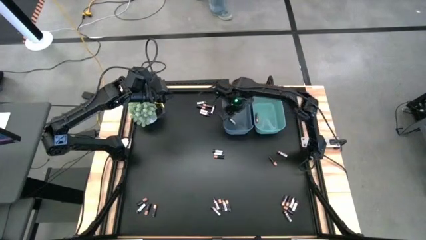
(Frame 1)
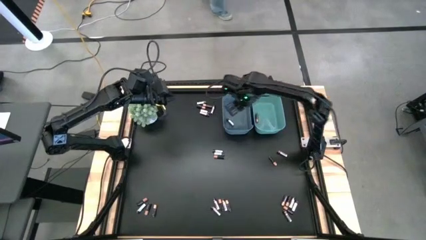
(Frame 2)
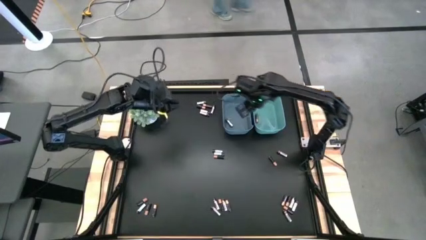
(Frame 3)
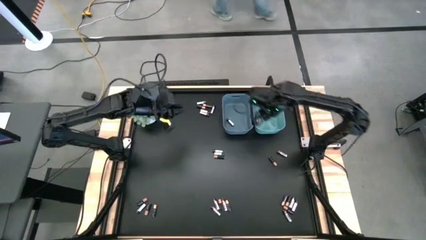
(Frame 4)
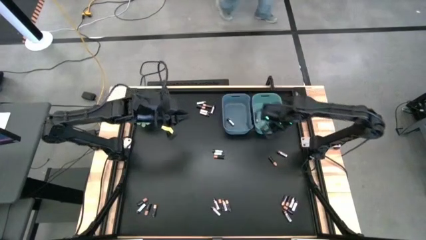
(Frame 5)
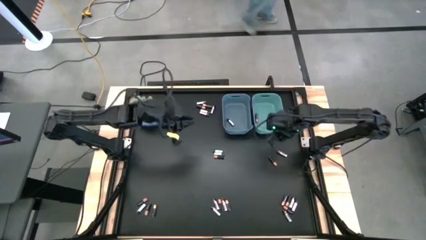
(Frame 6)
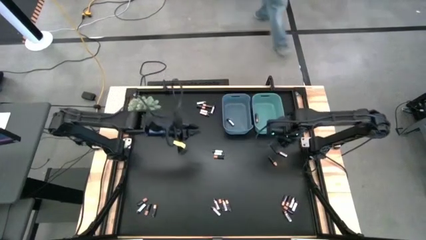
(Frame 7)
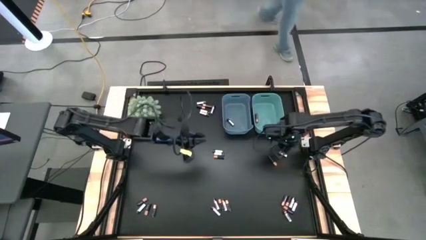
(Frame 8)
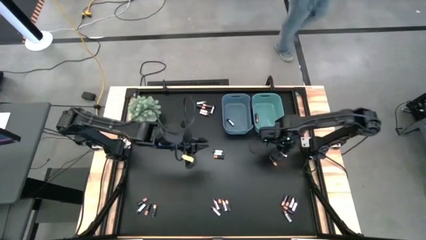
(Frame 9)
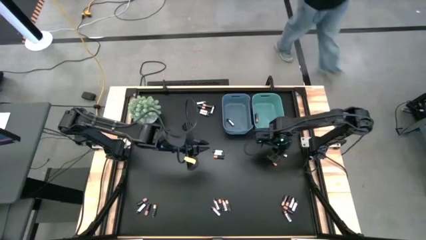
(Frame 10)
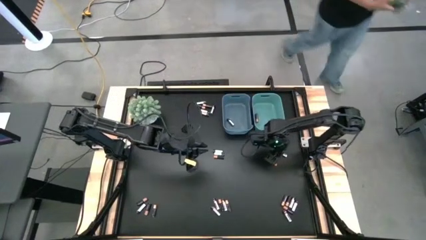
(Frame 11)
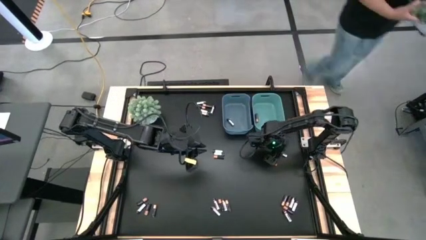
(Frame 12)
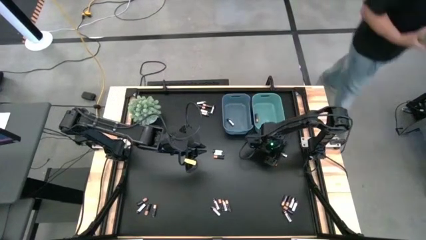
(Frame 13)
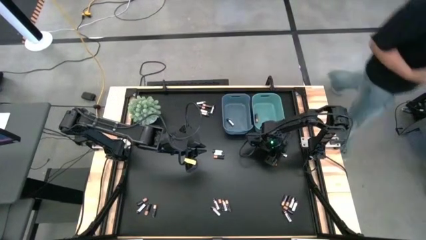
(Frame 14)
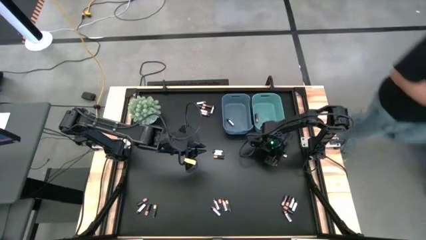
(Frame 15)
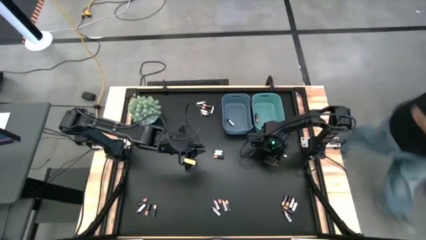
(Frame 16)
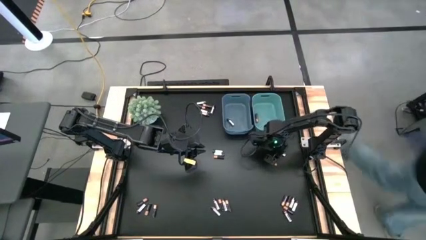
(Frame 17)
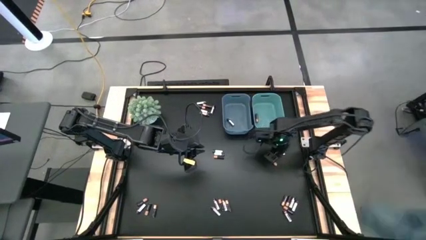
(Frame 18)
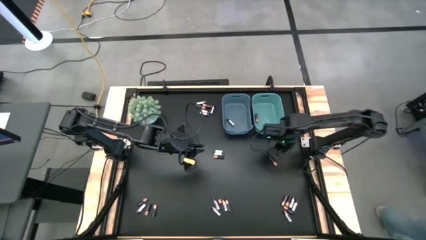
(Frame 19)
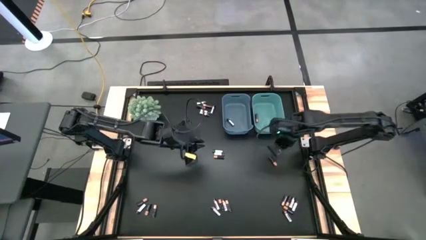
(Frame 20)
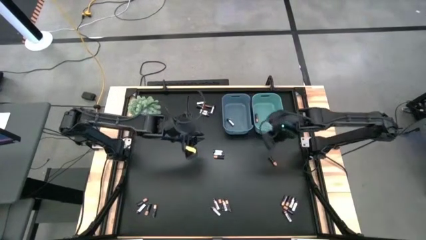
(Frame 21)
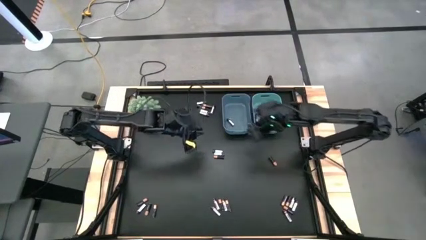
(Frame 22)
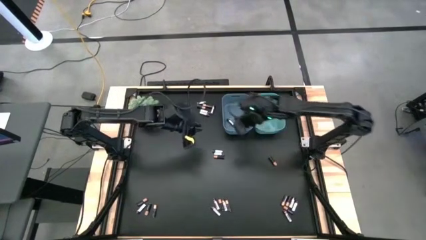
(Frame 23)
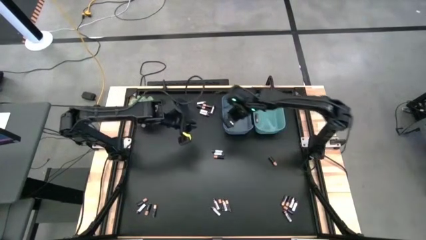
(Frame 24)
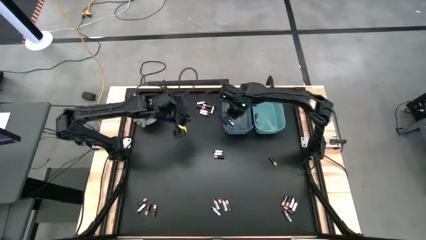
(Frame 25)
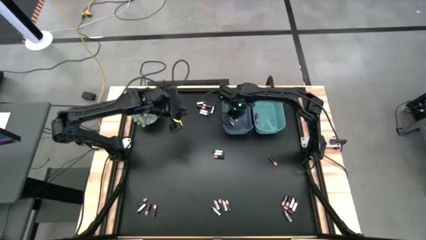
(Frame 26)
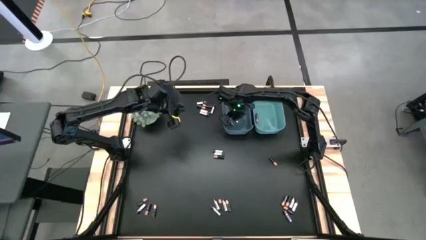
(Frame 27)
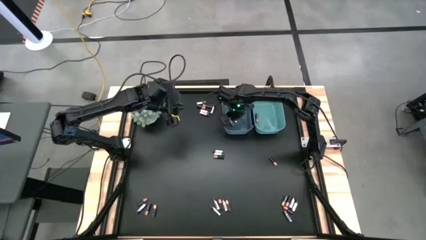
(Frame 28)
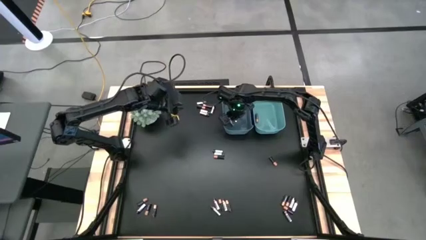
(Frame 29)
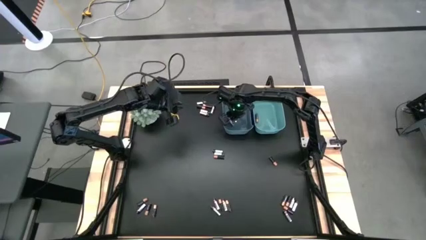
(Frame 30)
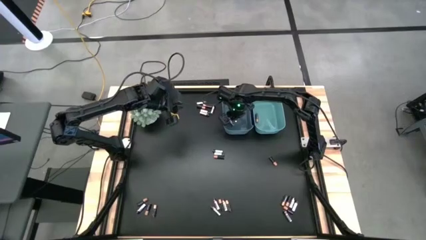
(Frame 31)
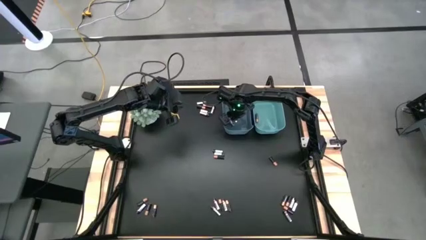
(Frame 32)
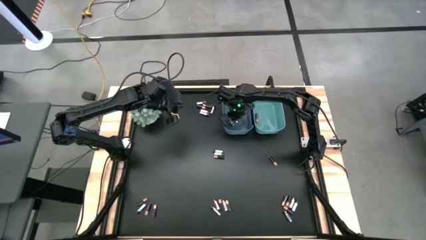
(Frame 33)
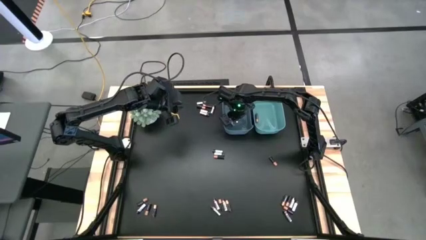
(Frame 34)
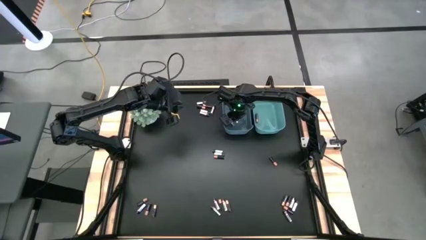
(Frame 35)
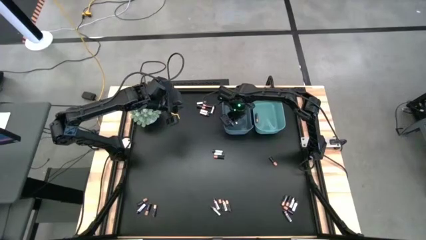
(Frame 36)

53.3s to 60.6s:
Task: Sort batteries
Put the silver battery into the blue bin

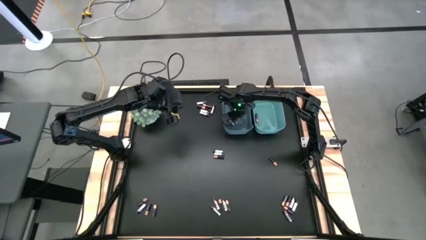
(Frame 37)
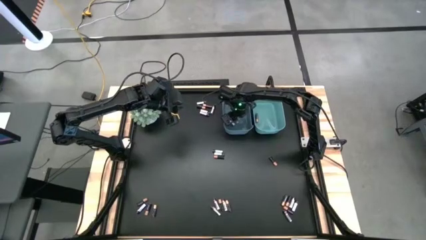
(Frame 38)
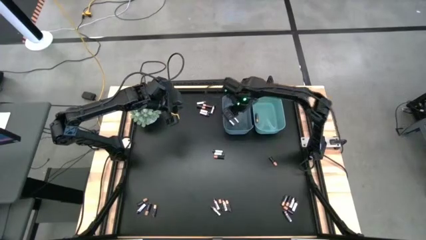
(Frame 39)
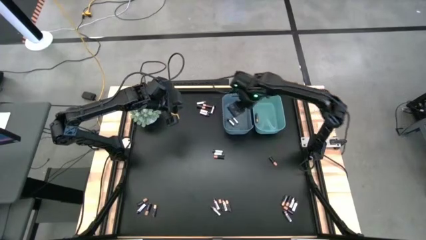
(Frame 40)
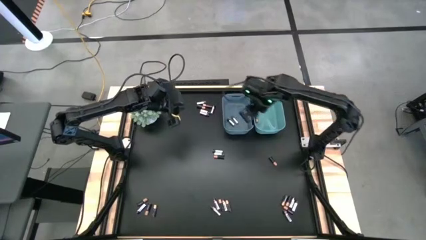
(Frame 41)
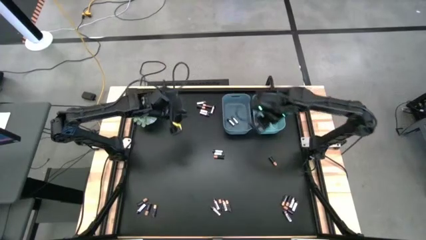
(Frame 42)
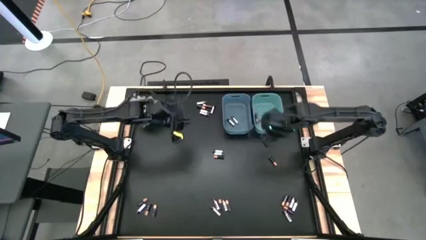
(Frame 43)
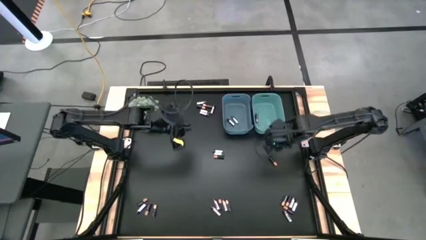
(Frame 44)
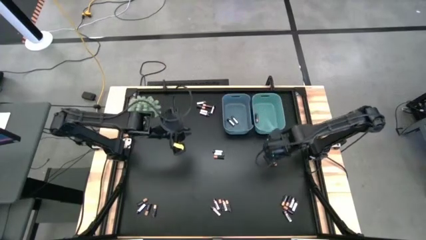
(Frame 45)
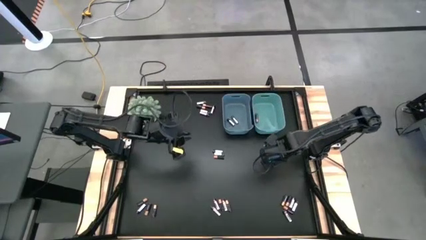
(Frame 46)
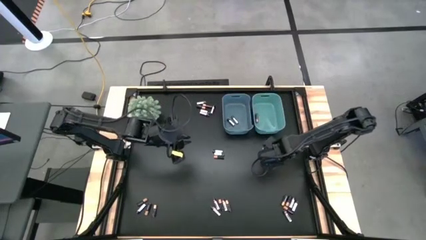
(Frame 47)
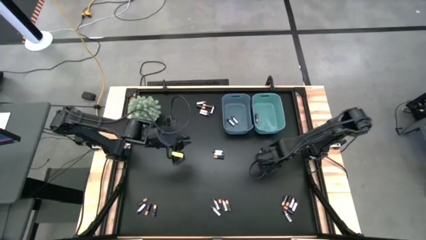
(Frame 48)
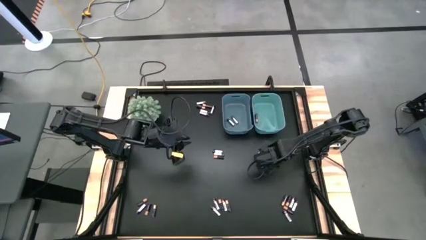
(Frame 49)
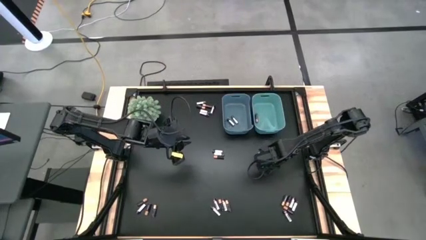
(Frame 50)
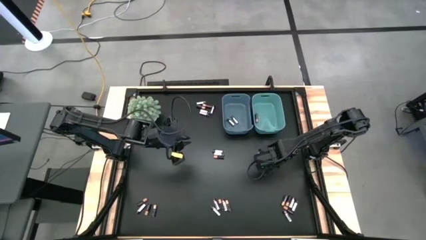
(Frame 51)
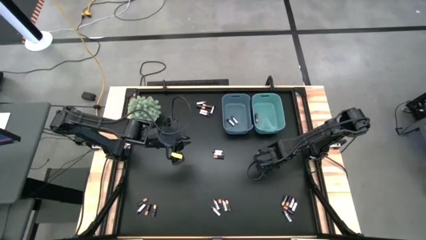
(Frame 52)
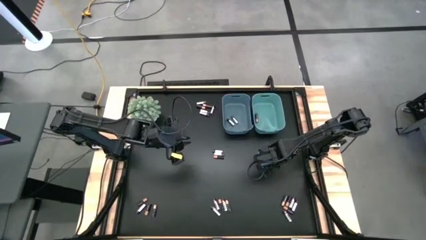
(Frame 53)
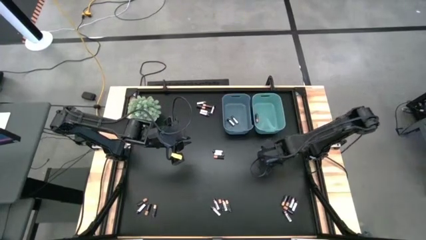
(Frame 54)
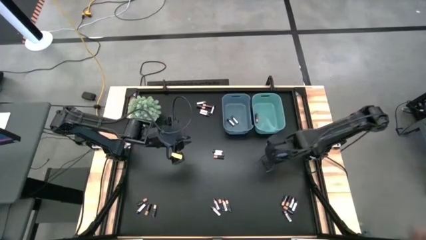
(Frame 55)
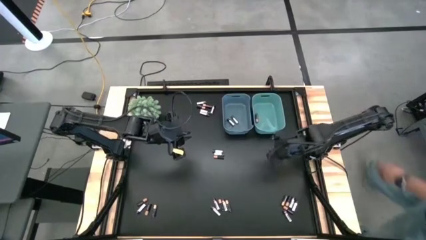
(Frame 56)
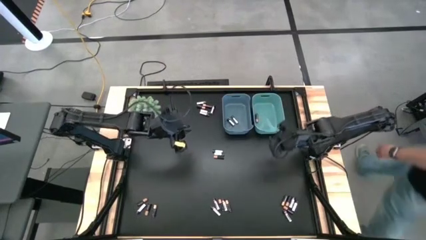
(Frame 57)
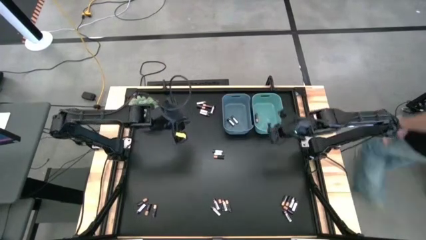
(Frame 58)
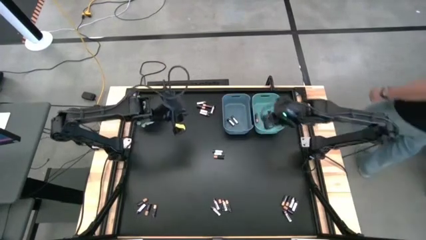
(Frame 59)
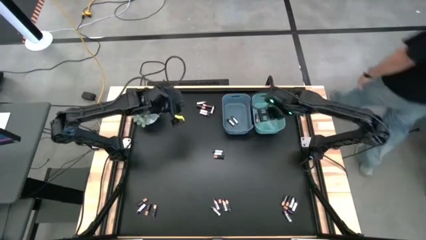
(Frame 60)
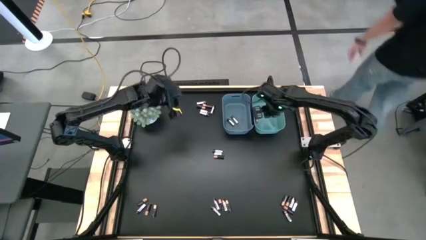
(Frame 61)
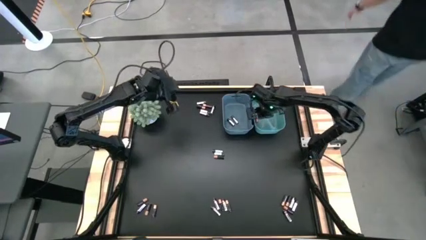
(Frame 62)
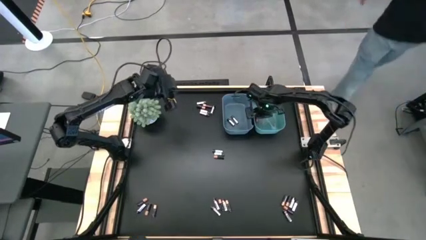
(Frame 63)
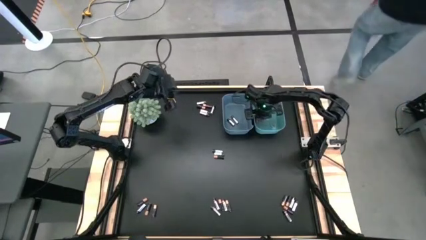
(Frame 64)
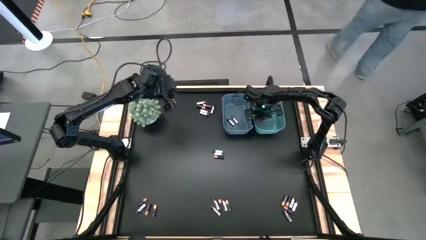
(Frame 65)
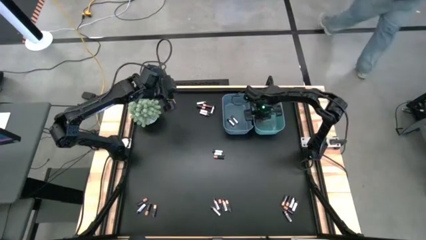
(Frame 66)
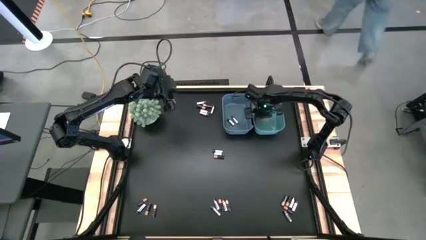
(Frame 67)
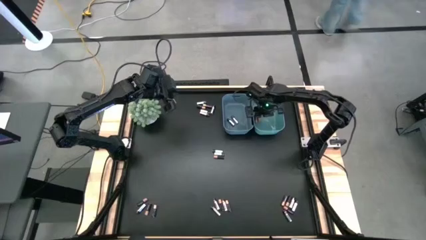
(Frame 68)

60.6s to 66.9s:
Put the black battery into the green bin

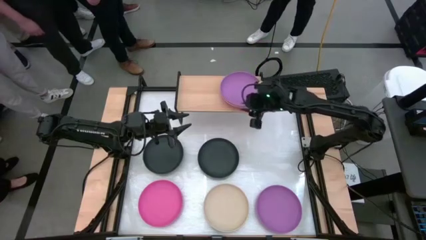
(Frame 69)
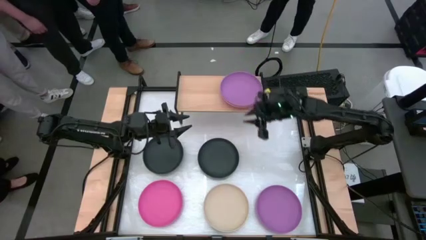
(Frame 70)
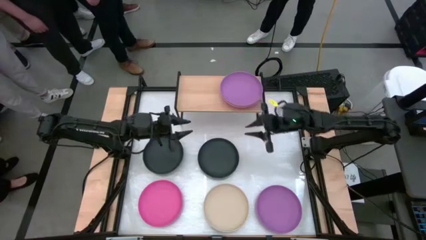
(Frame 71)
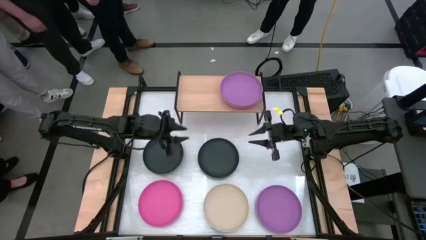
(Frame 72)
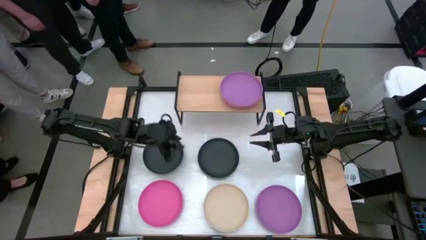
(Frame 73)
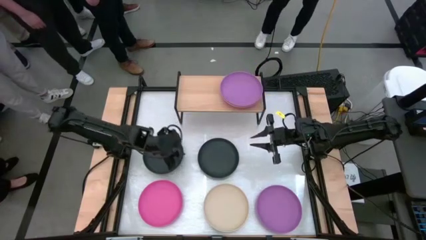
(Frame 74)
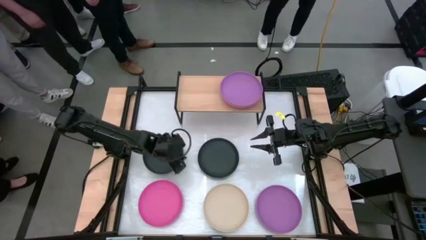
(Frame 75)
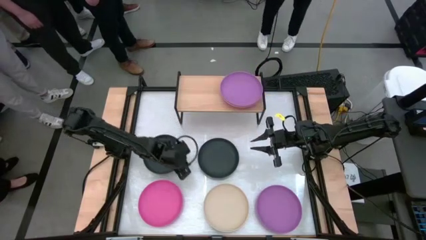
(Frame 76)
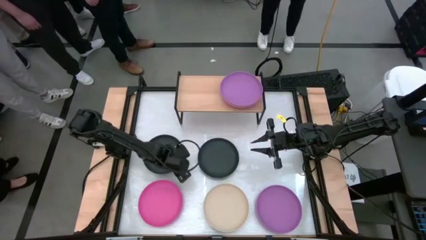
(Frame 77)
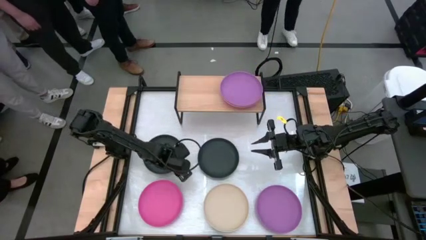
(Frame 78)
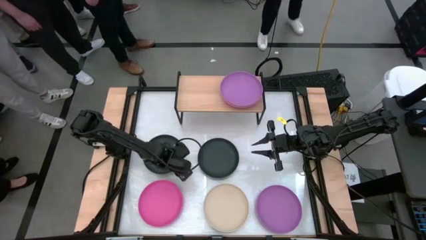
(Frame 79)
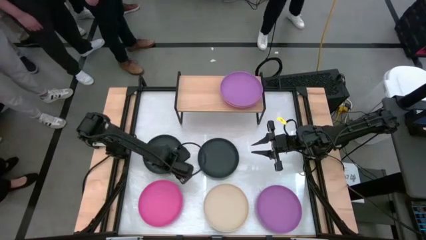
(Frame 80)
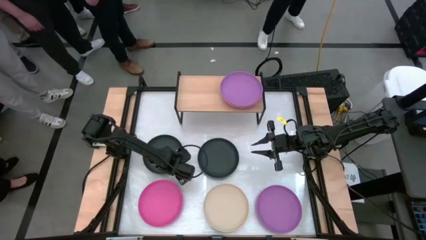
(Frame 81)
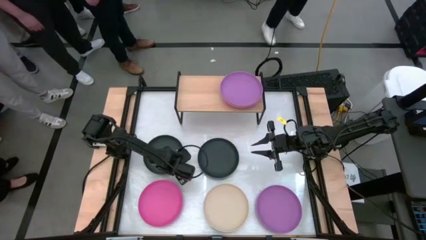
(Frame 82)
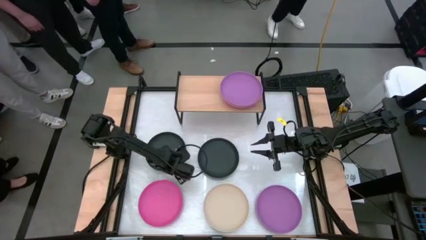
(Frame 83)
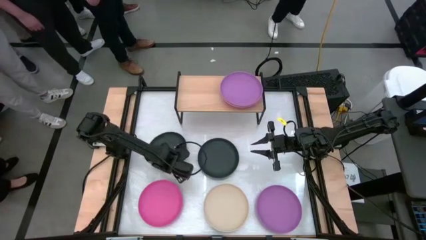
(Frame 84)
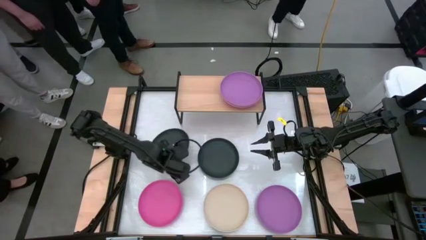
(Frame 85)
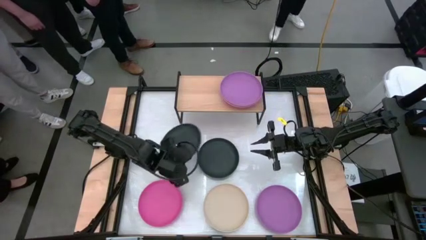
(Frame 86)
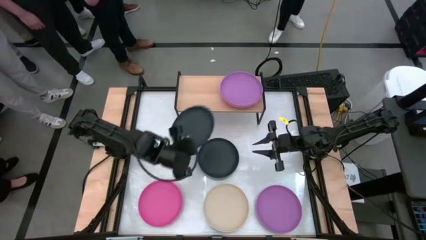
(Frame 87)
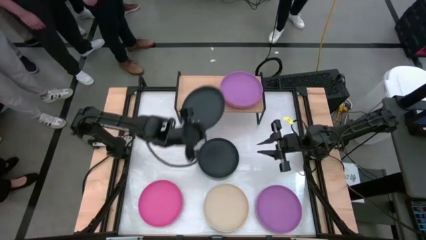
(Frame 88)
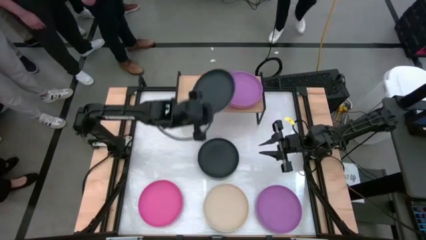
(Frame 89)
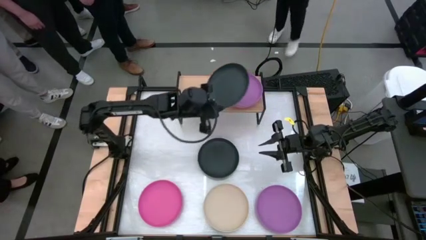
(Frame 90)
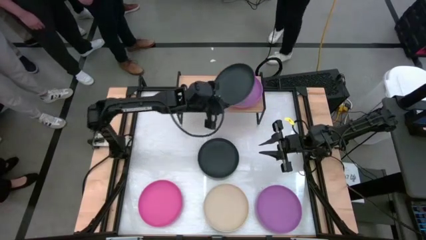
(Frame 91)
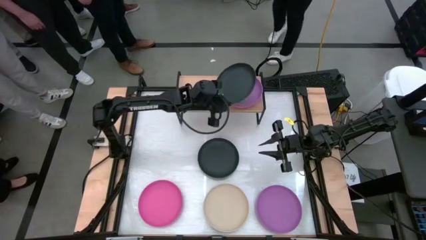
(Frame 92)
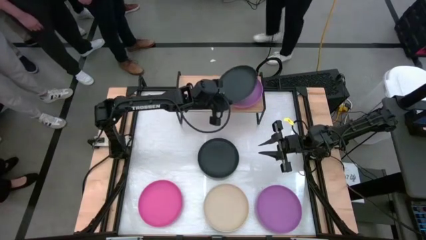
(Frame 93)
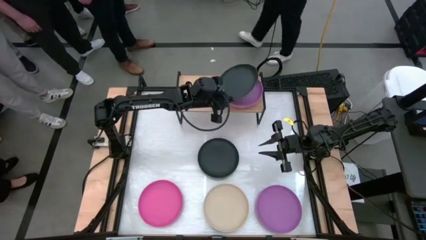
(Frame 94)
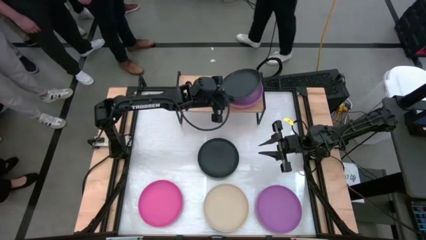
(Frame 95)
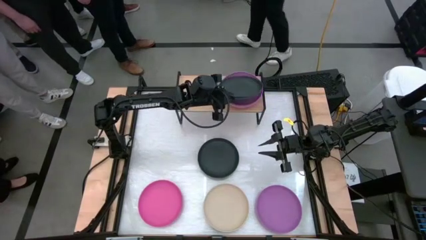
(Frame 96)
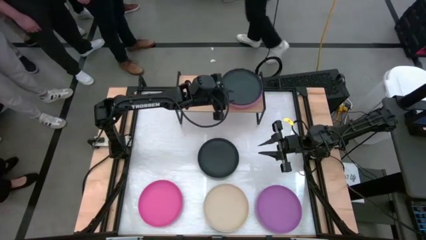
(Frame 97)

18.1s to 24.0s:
Task: Place and stack plates onto a shelf
Stack the left black plate on top of the purple plate on the shelf
